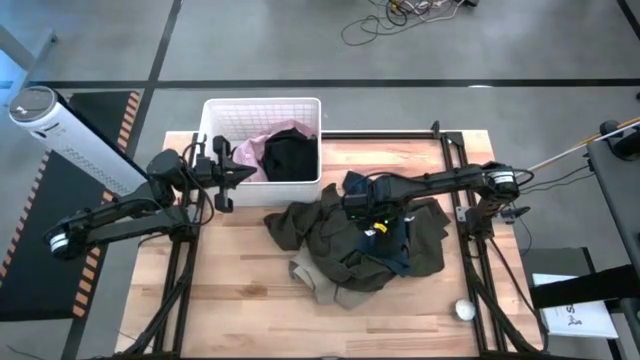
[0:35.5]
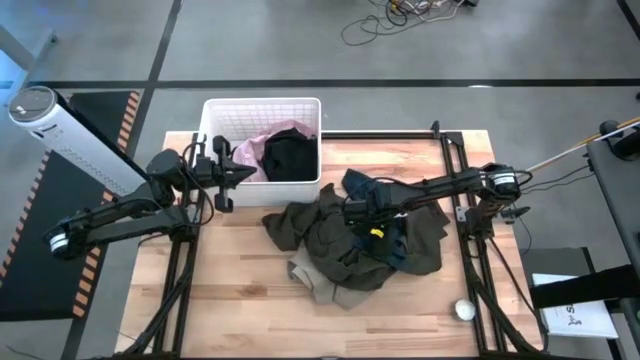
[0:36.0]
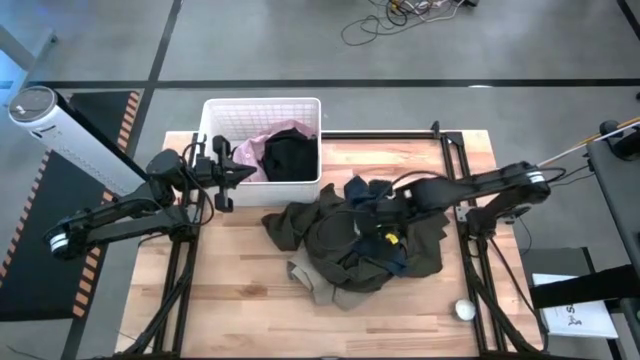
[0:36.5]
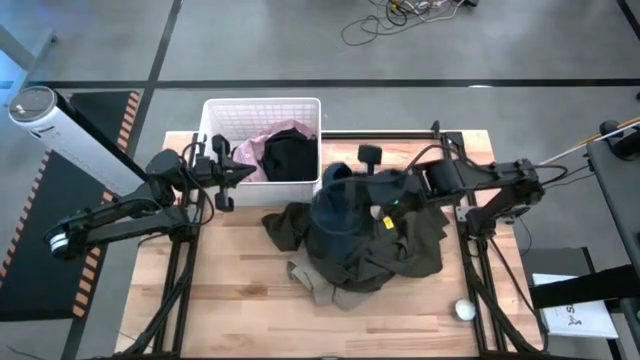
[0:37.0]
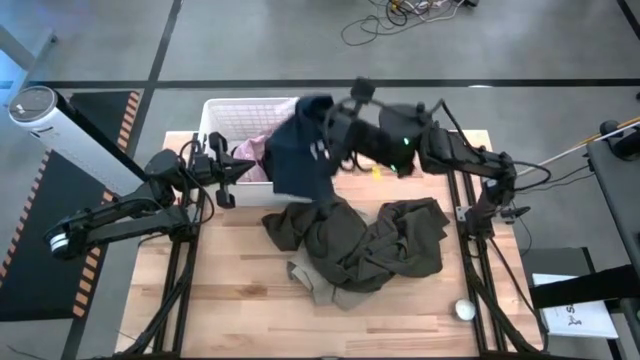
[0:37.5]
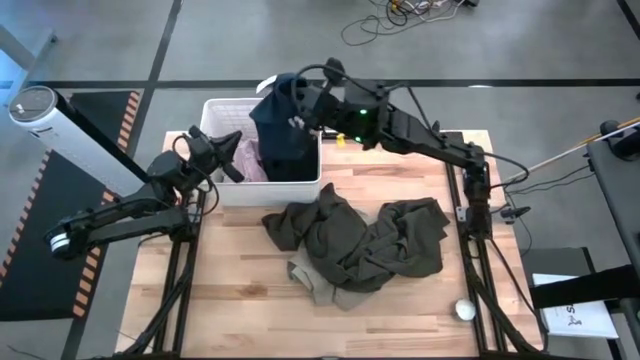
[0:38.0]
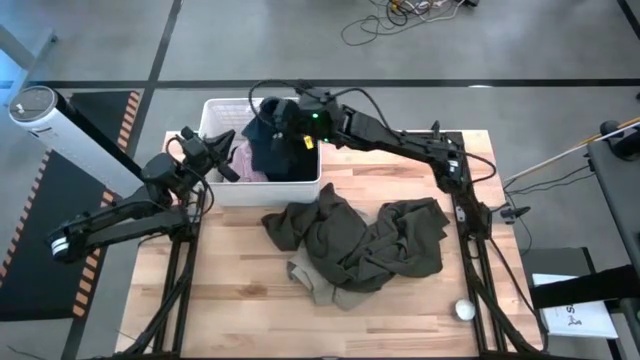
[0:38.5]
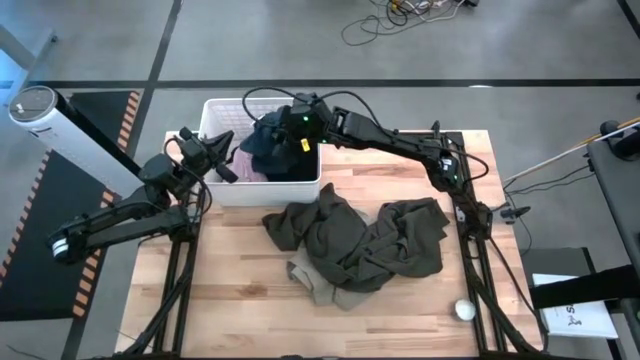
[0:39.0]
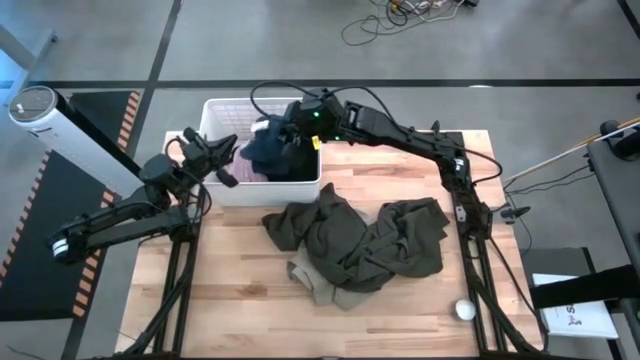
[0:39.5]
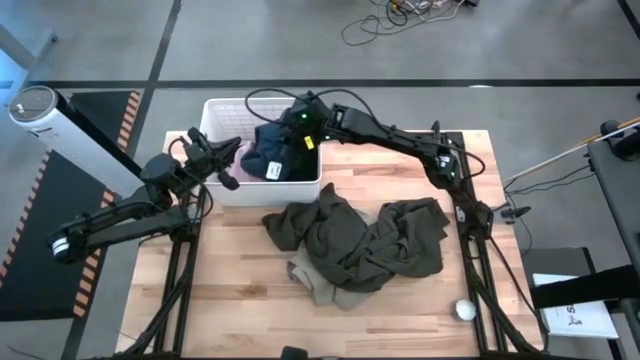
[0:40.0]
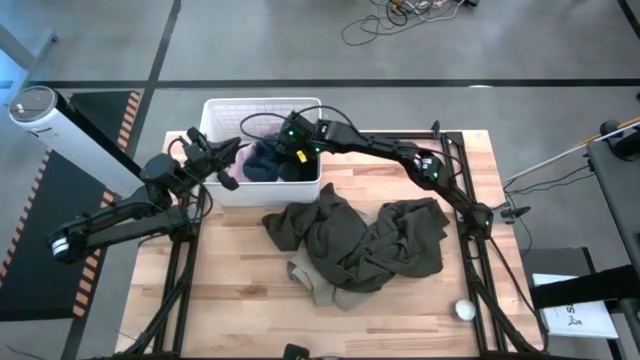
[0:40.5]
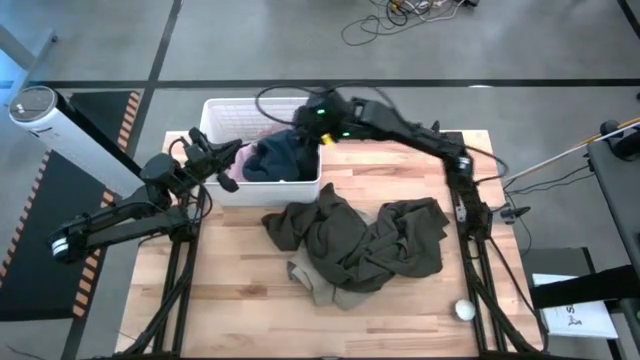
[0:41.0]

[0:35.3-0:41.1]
Task: Sort clothes
Put the blue shorts into the white bin

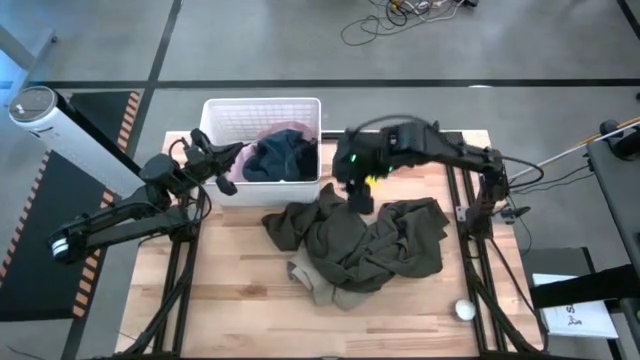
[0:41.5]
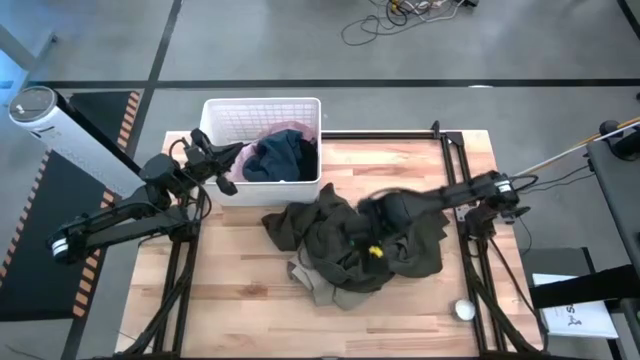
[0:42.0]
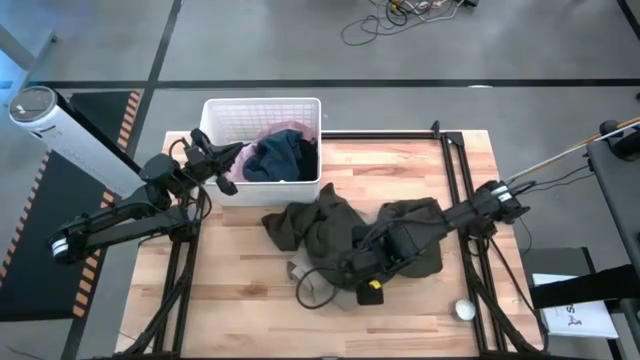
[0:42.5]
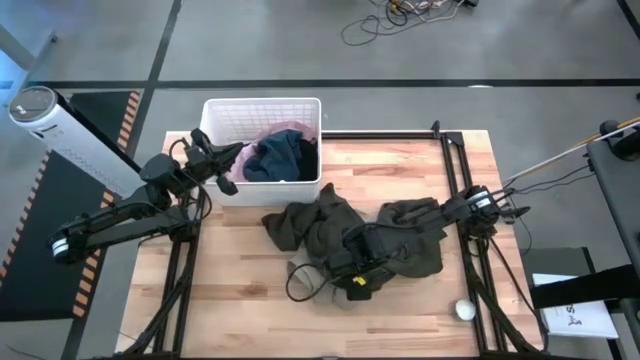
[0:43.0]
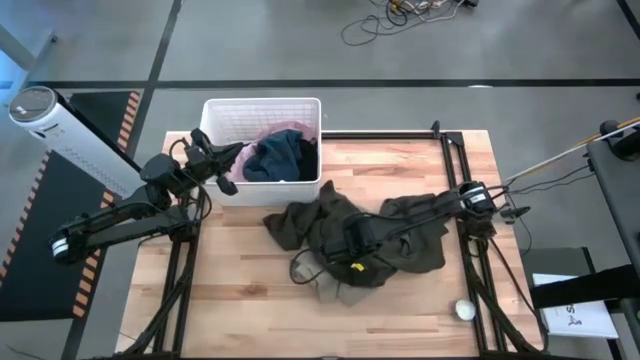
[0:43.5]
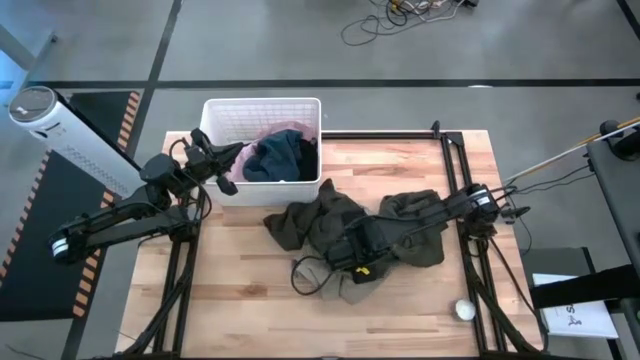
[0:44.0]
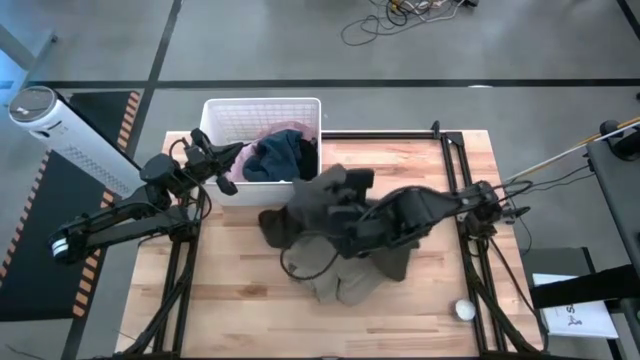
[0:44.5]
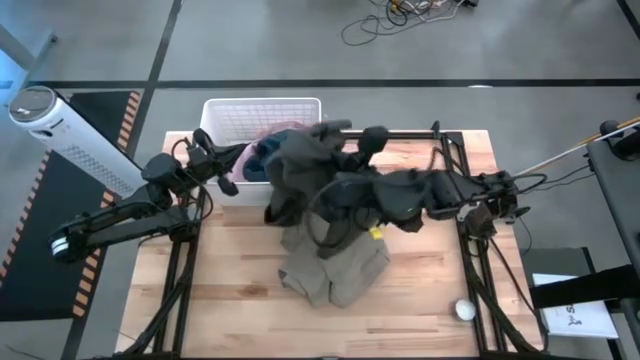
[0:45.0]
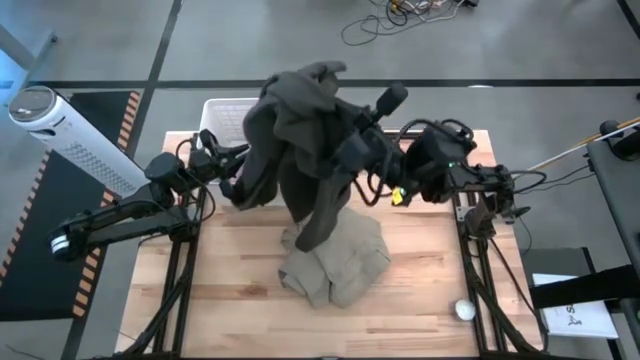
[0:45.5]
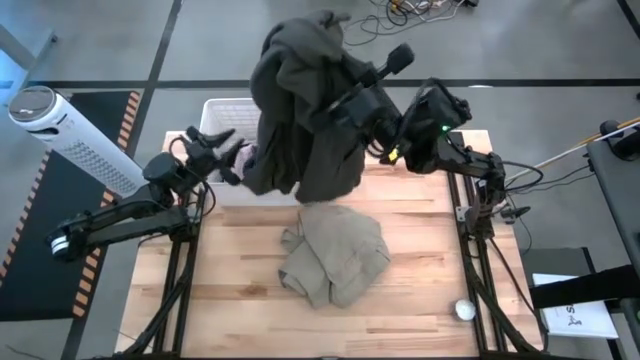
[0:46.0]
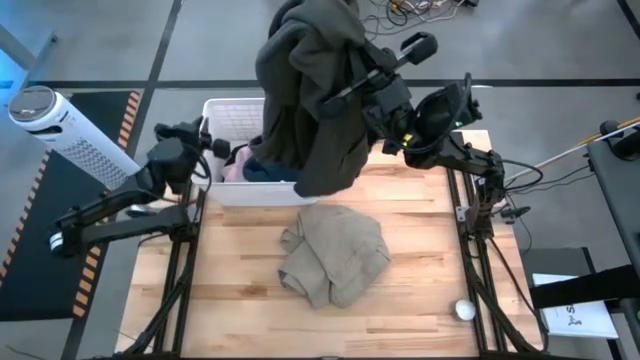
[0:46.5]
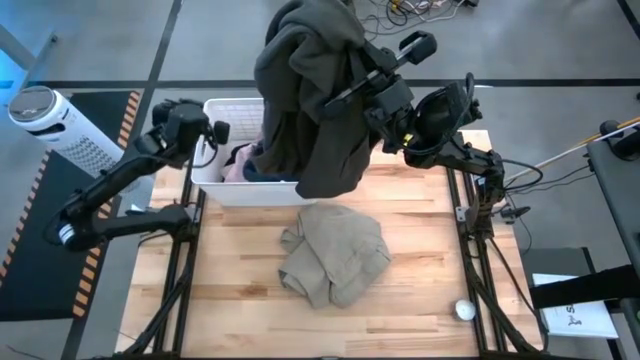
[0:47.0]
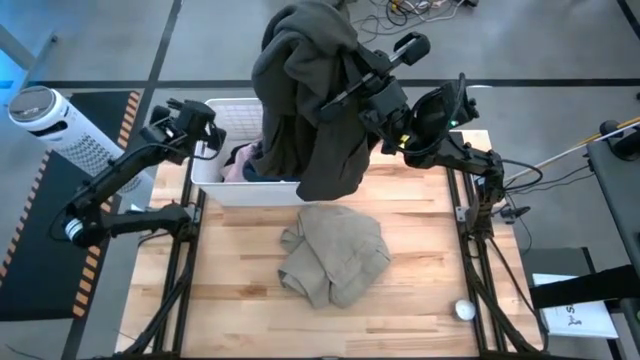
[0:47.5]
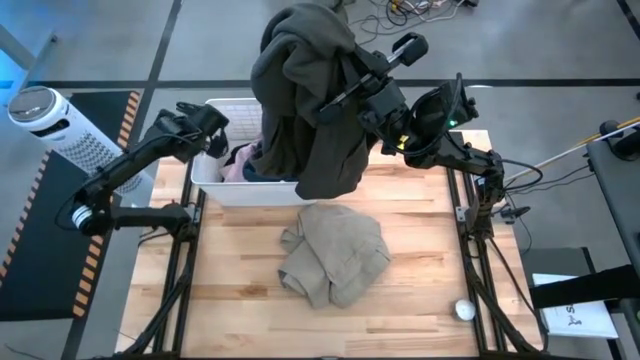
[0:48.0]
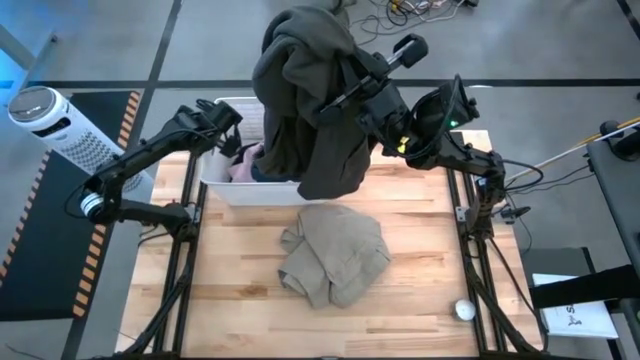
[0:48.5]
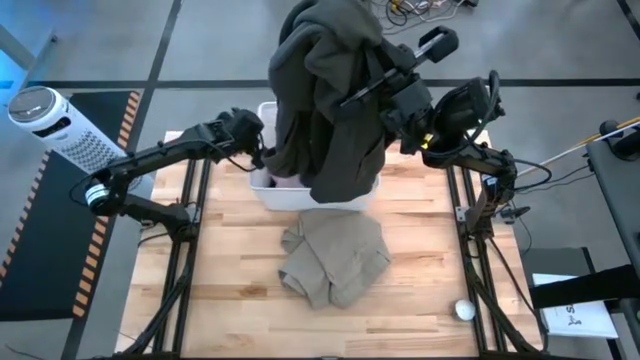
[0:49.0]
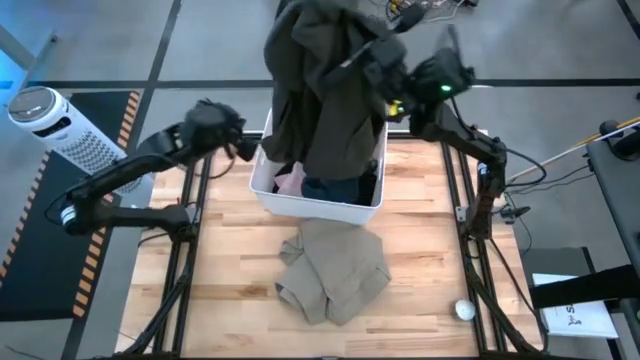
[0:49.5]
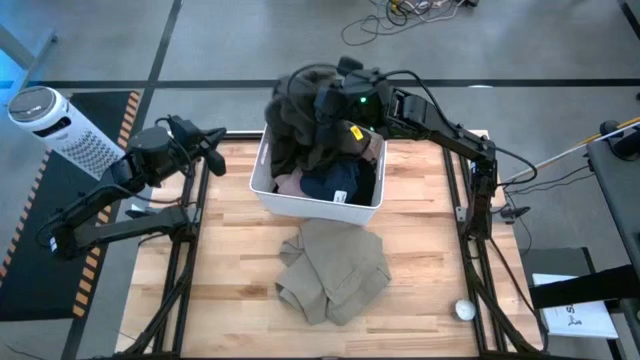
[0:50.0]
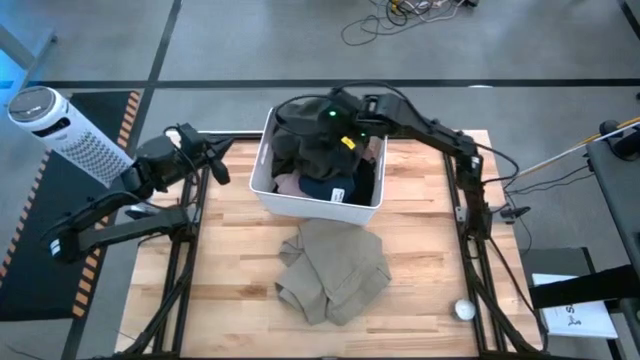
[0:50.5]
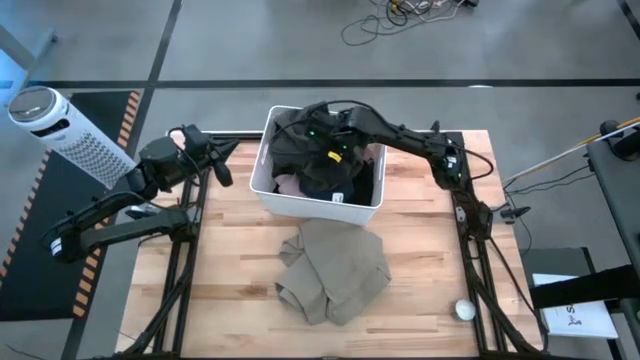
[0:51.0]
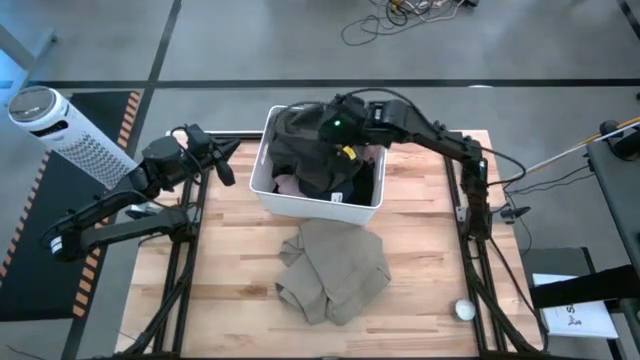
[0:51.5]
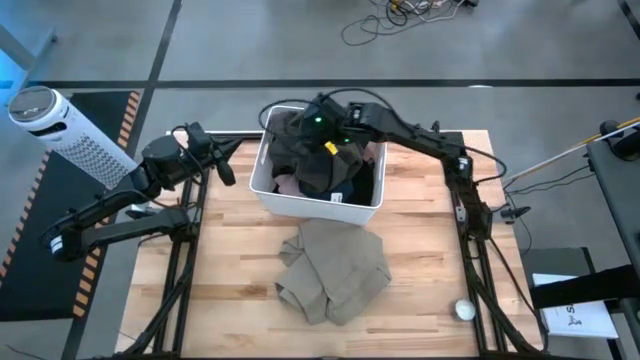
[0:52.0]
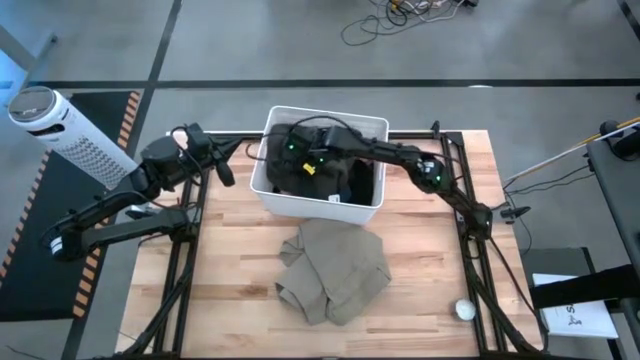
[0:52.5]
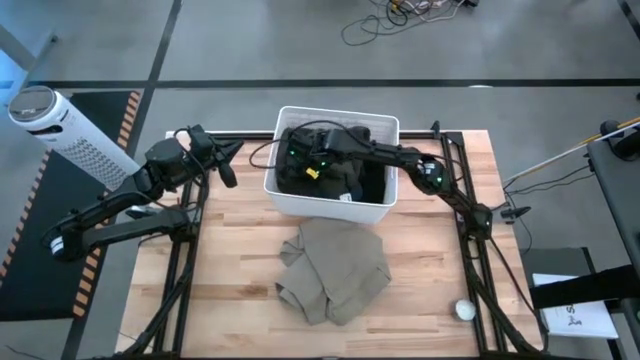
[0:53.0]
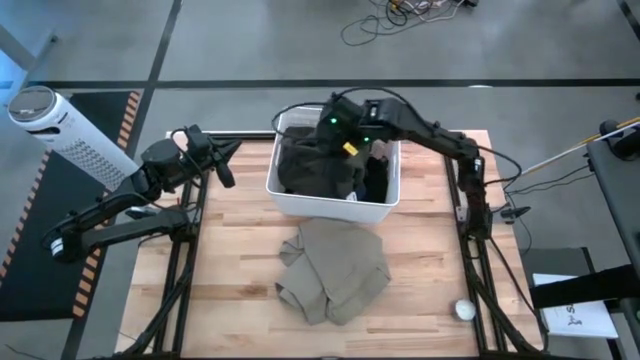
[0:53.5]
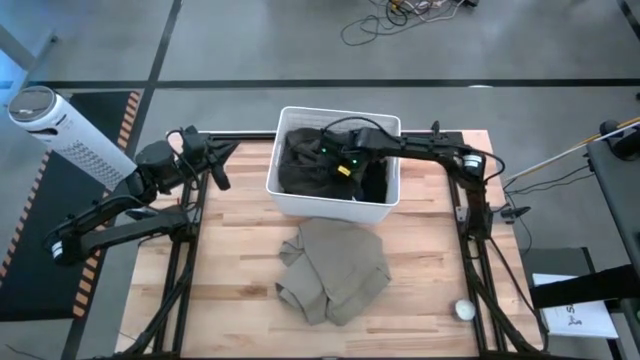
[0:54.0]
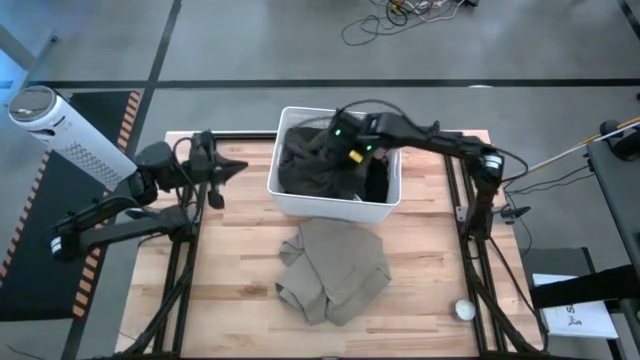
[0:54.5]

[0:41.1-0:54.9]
Put the black jacket into the white bin
